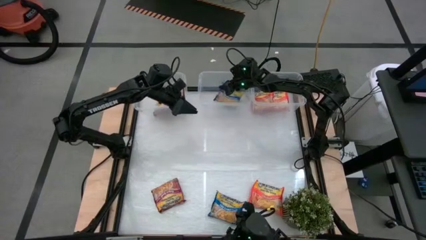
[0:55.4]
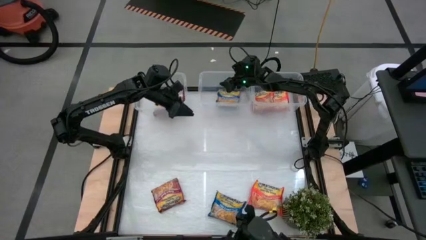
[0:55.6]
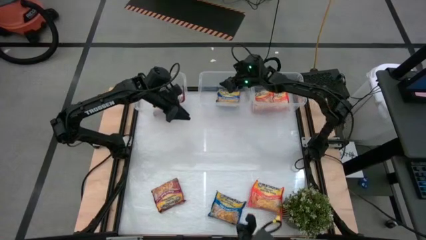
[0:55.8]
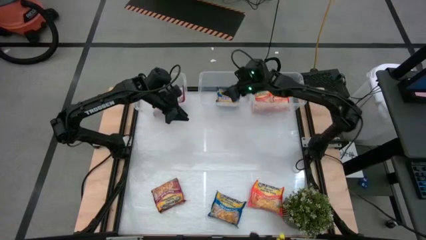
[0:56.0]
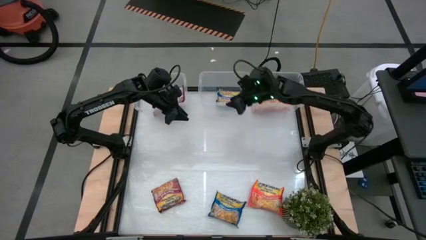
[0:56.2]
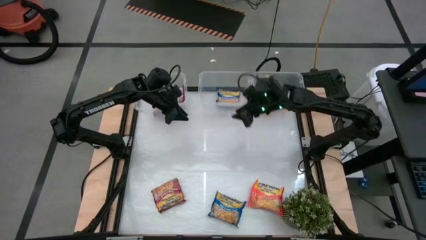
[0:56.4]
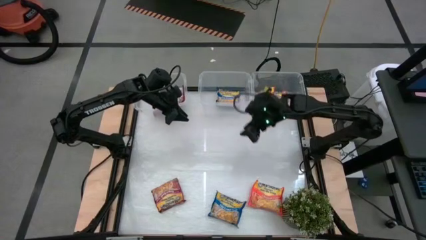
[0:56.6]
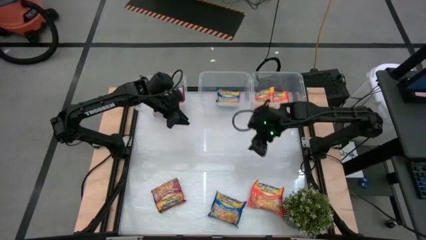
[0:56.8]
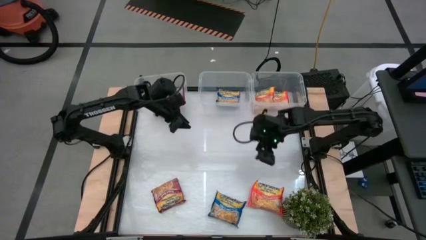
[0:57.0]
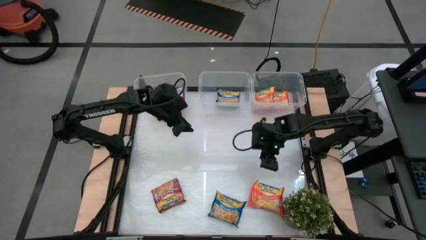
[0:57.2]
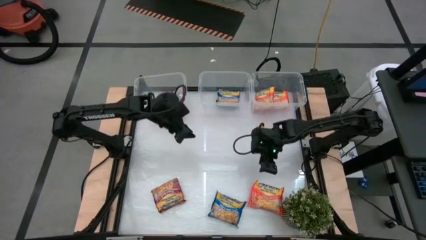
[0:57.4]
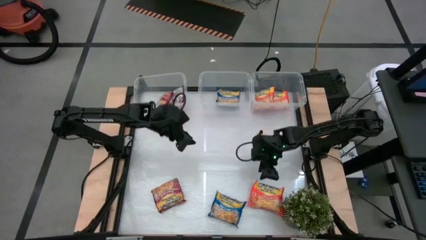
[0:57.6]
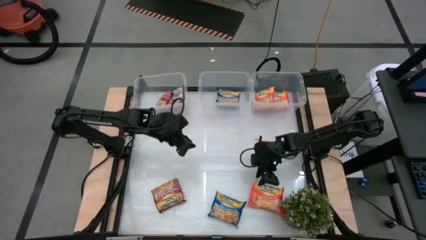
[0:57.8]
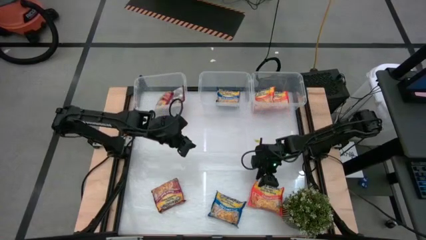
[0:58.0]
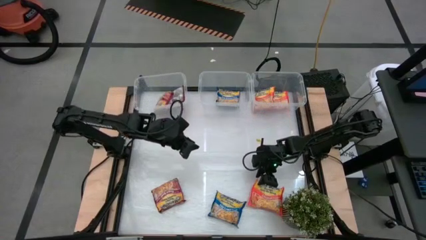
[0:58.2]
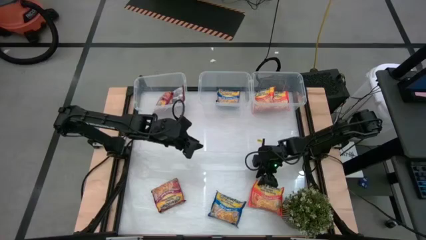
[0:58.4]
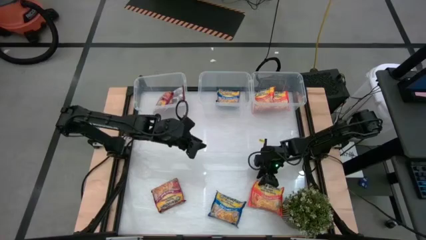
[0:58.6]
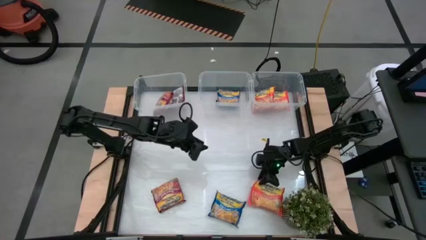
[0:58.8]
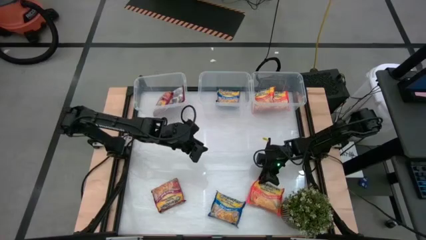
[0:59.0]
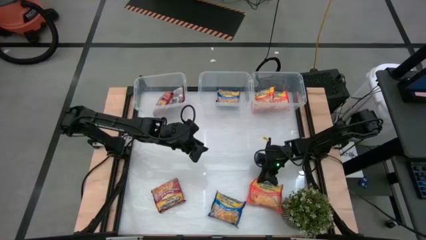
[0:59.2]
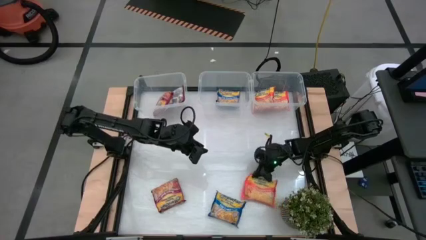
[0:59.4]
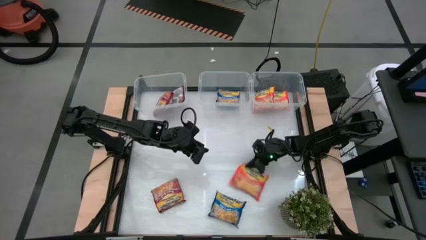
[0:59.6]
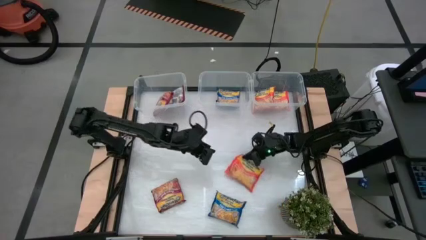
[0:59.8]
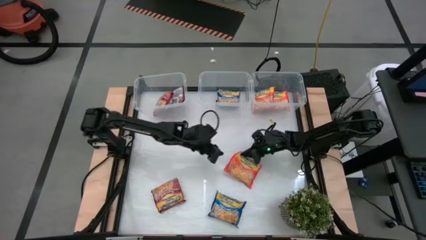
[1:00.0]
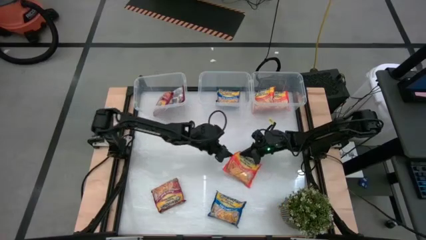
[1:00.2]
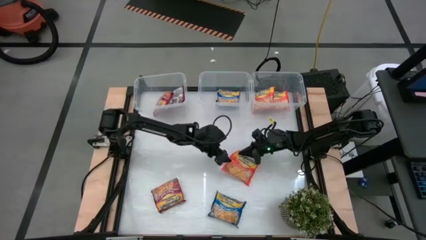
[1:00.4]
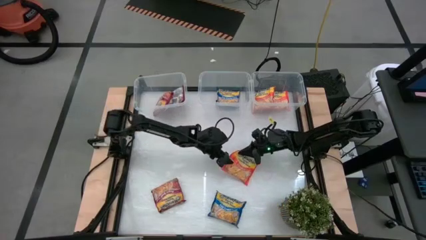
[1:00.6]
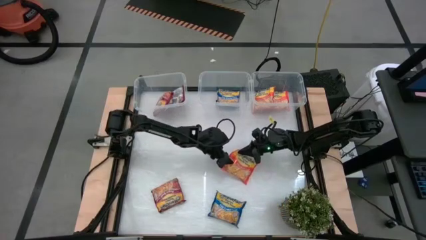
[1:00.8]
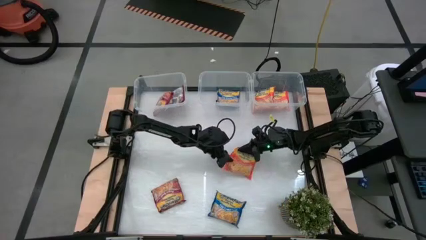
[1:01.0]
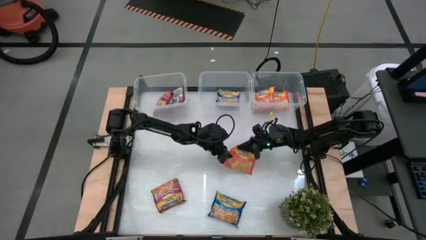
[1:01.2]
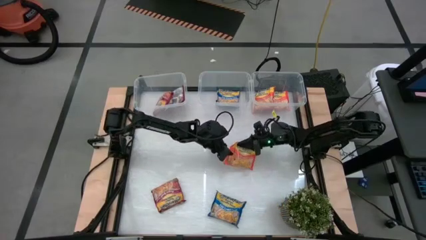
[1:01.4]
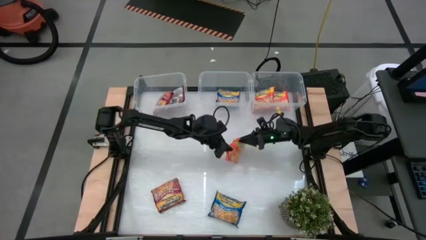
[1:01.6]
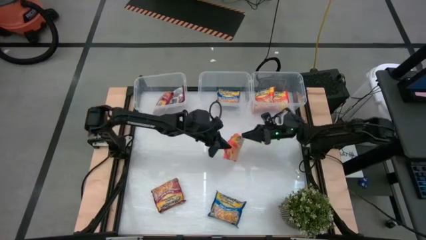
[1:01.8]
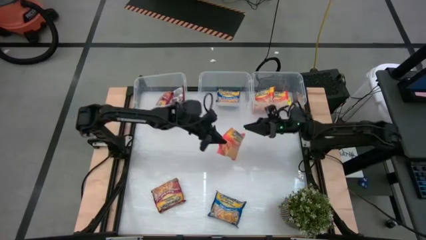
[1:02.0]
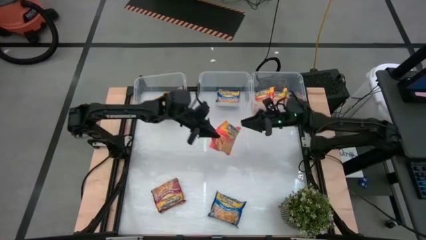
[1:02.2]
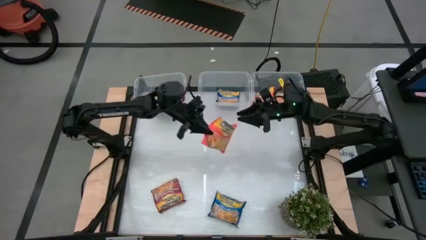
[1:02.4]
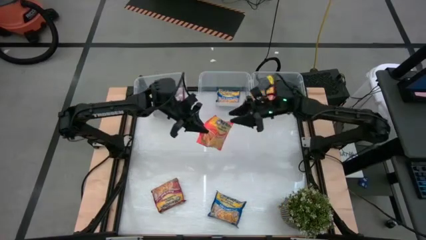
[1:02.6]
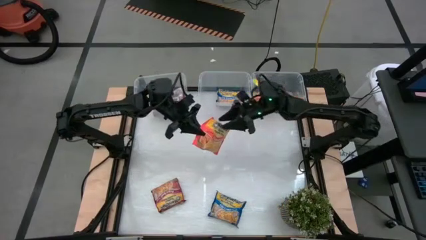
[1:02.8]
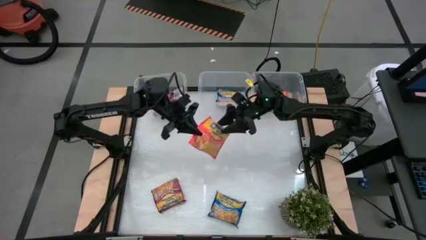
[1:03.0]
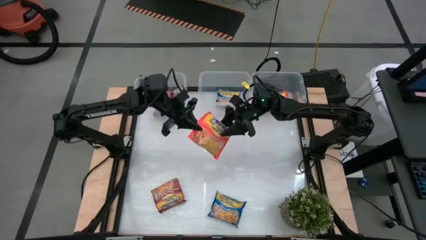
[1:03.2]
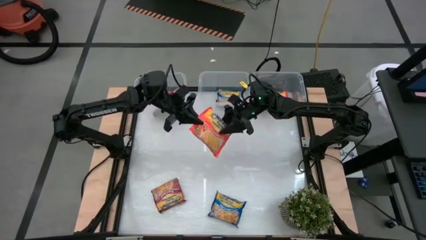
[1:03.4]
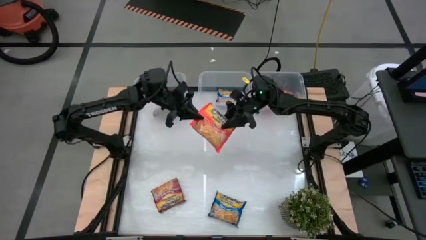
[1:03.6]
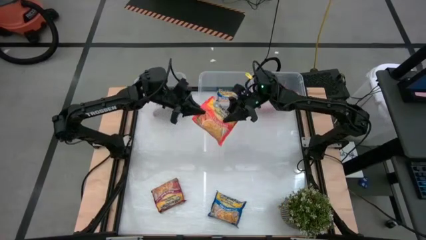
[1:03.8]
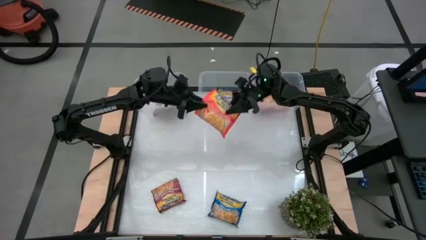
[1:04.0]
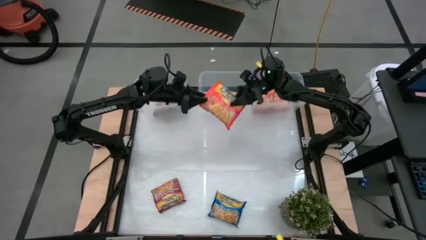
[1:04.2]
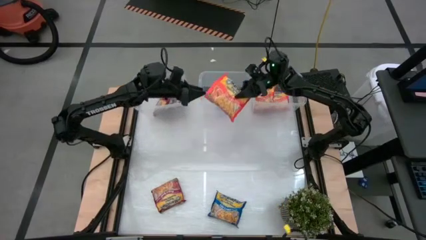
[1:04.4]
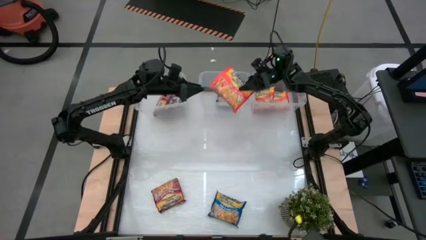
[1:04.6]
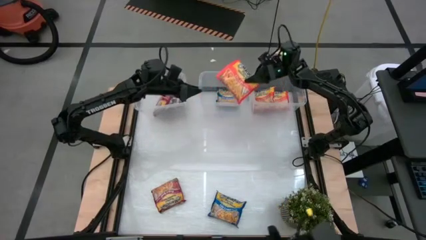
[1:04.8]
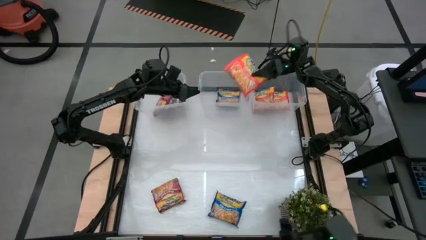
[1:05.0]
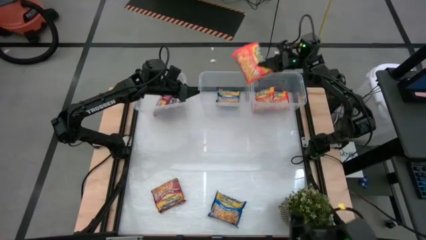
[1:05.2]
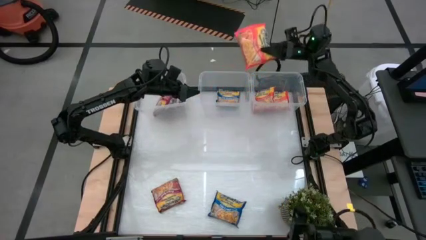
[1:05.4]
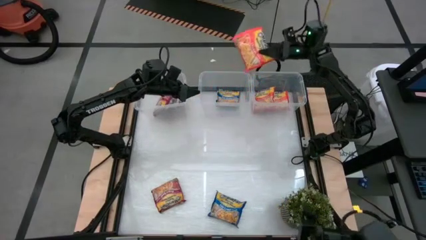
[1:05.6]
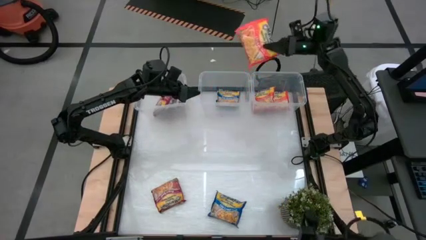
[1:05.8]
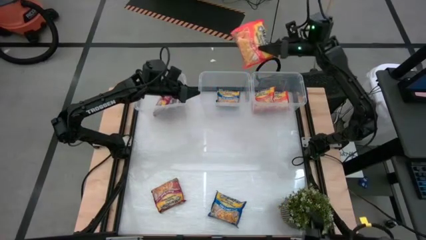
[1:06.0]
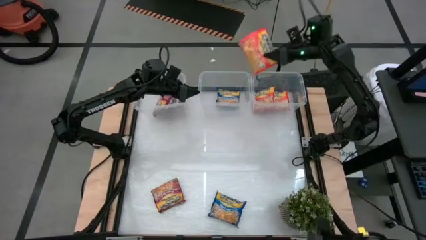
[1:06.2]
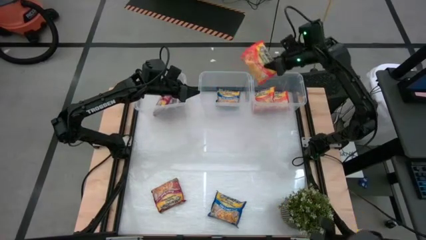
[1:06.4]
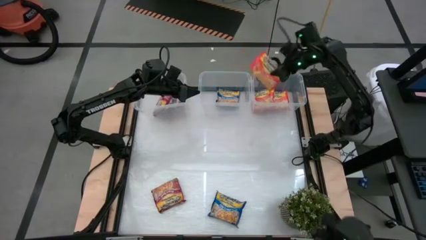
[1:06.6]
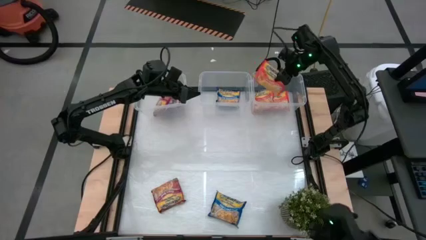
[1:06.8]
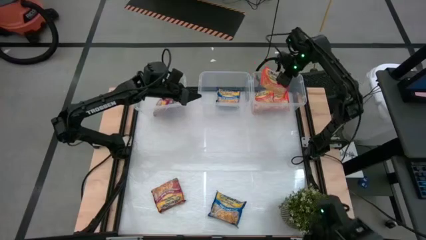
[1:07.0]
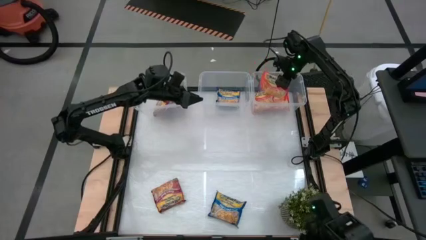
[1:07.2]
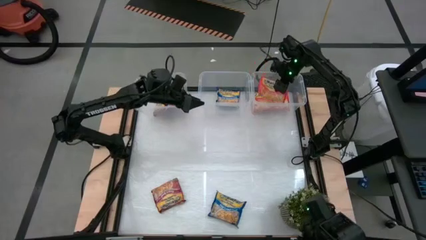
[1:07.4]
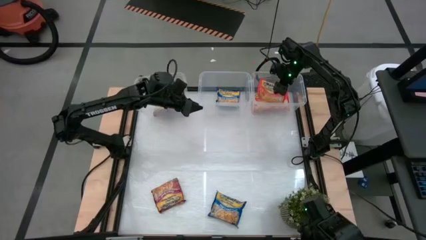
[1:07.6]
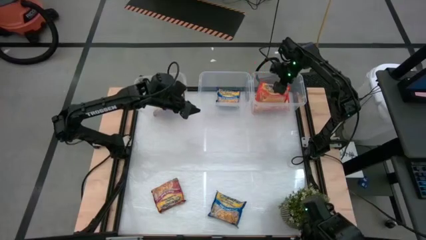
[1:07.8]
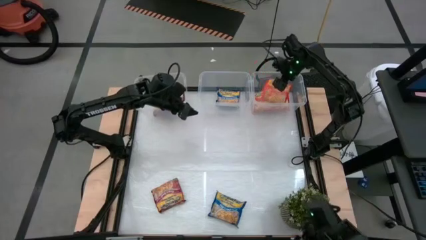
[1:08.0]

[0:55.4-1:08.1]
Task: Sort Maruchan noodles
Put the orange noodle pack into the right transparent bin

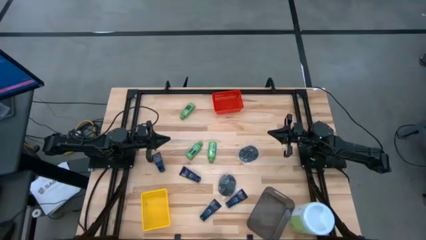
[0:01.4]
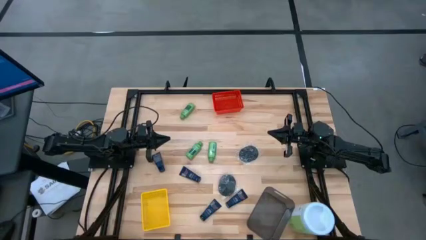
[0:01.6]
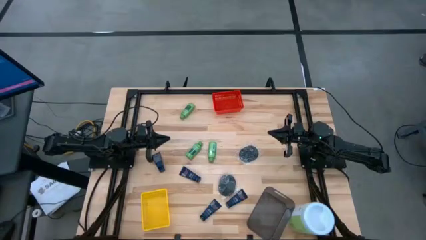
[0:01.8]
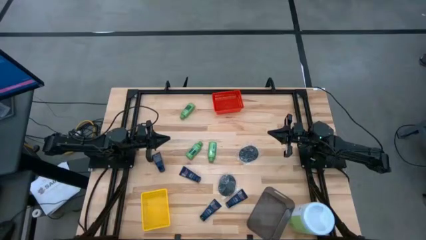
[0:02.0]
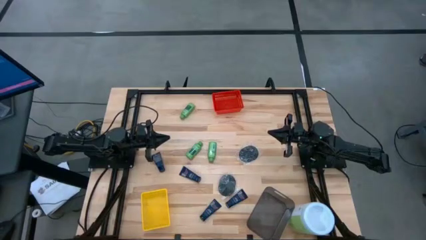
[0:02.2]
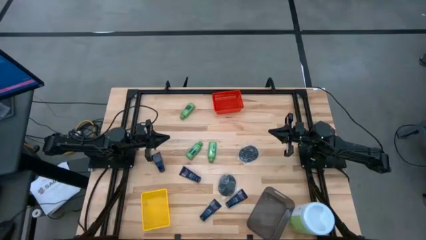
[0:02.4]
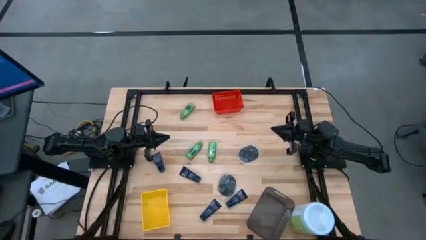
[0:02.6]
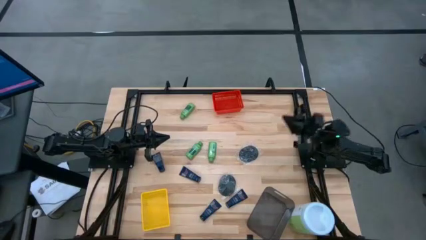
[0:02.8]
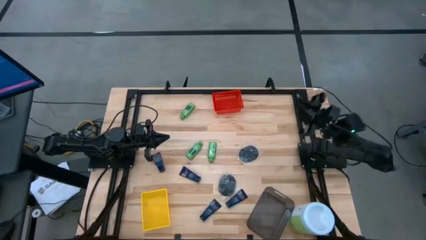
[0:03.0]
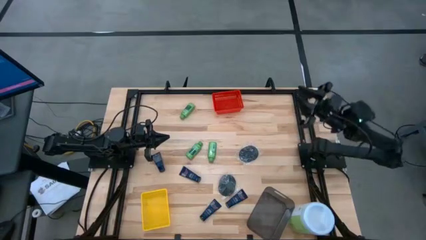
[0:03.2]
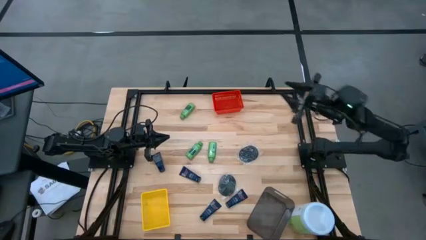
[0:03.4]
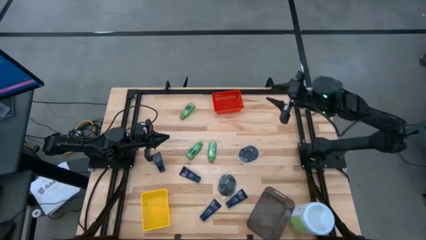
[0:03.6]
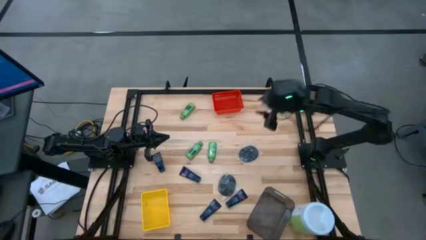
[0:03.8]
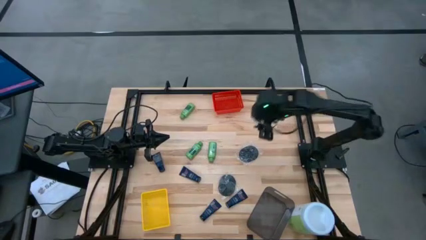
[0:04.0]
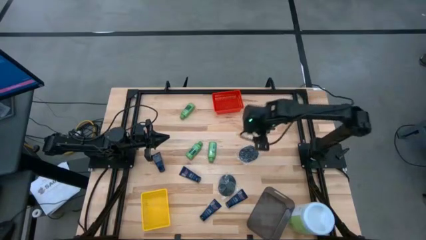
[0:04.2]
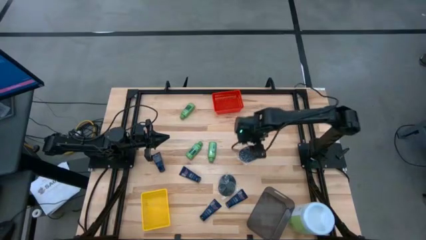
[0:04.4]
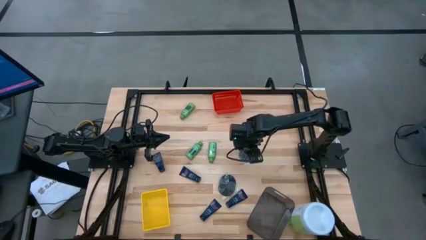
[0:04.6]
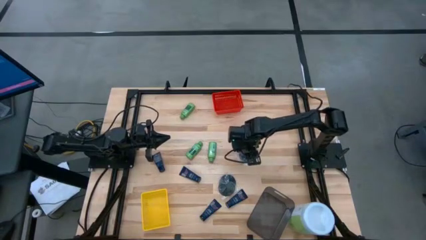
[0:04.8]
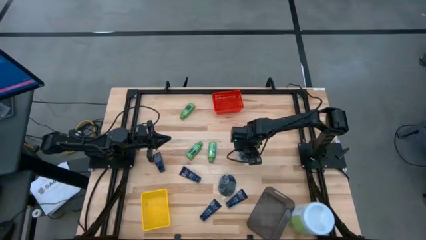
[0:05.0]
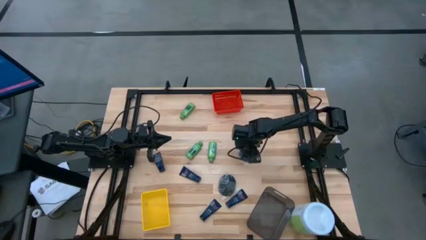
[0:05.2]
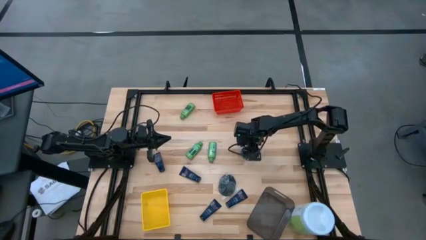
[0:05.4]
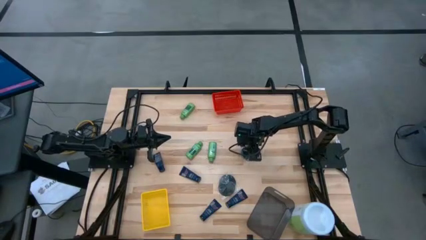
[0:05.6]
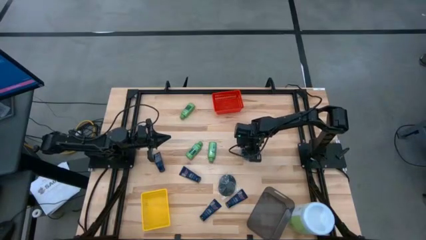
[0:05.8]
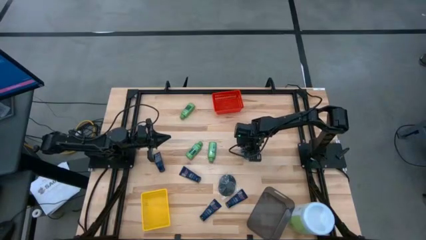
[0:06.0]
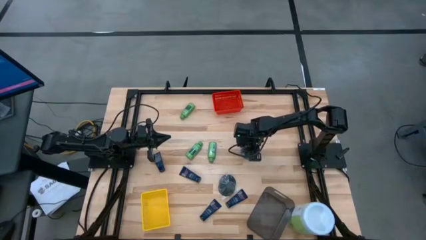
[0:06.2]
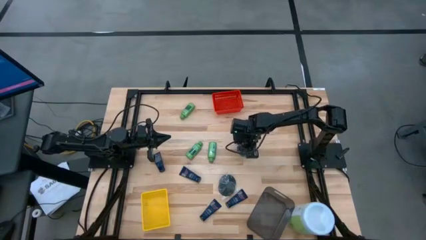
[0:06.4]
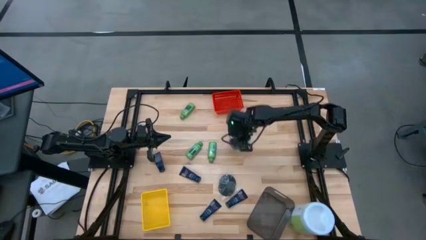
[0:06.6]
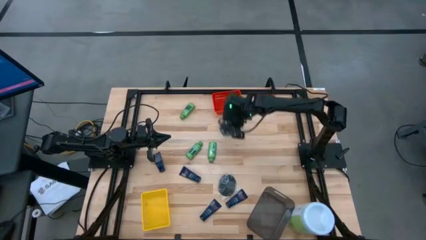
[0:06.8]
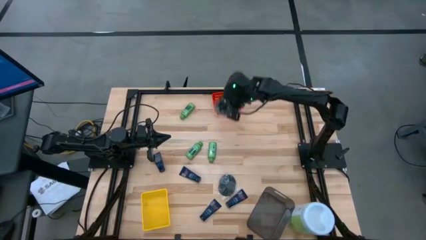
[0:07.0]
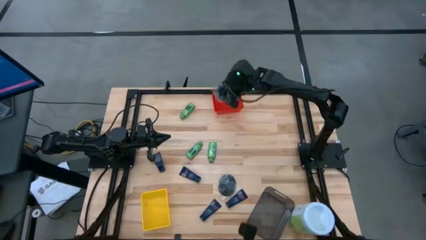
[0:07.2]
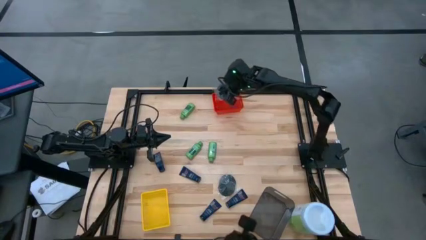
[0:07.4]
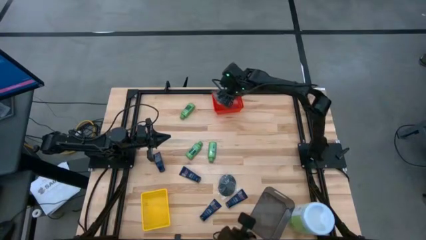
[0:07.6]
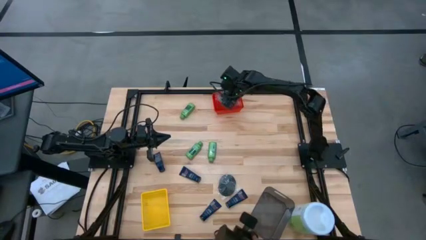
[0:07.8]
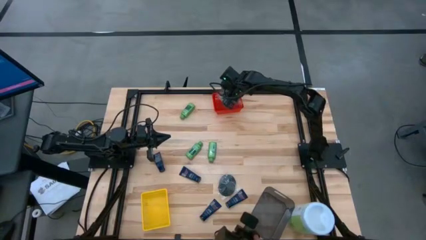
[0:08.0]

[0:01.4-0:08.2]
Task: Pick & Place Travel size toiletries
Put the black hairbrush into the red bin
